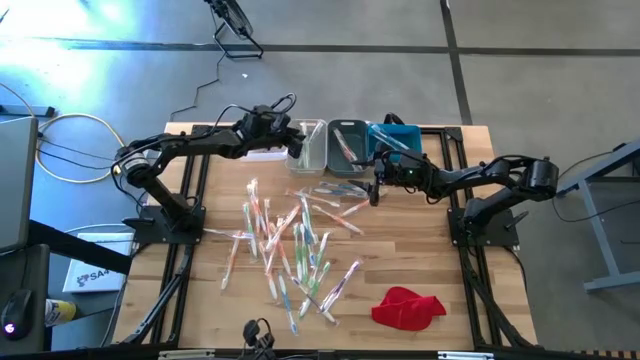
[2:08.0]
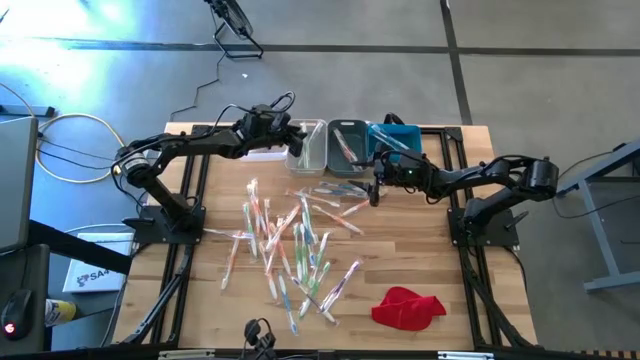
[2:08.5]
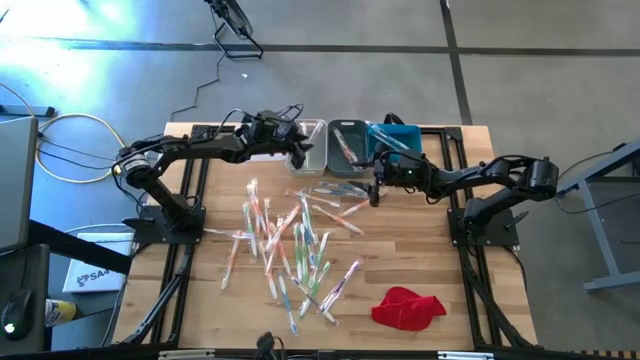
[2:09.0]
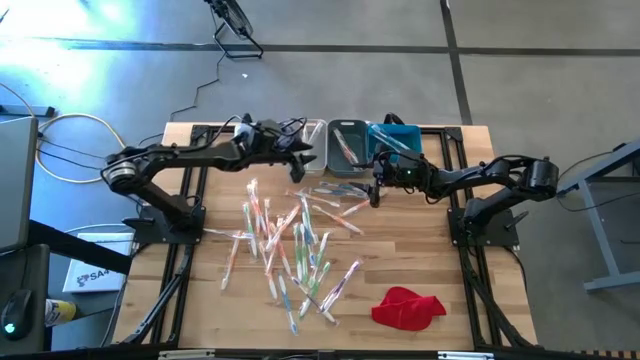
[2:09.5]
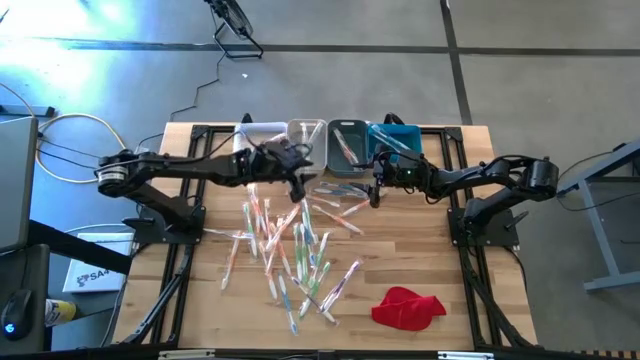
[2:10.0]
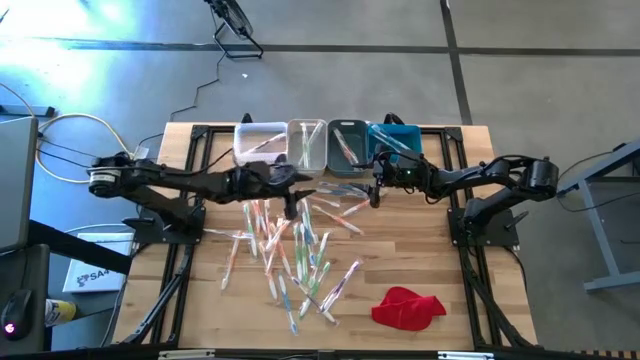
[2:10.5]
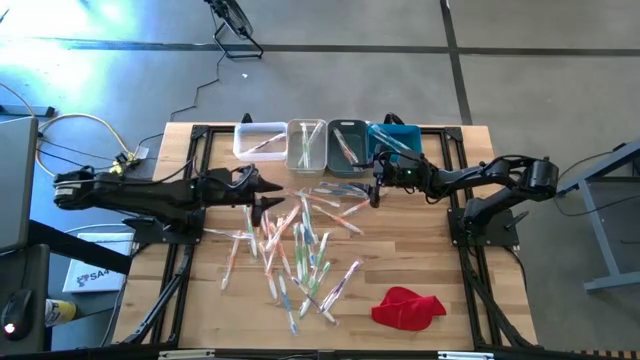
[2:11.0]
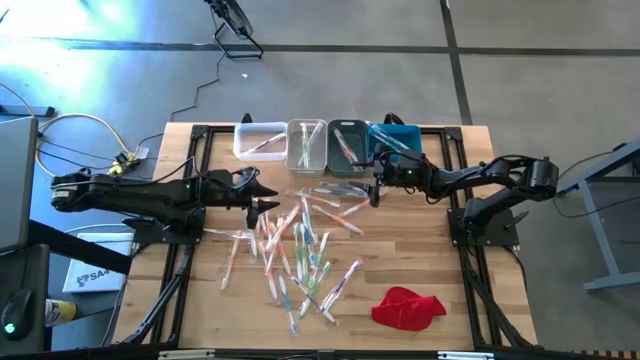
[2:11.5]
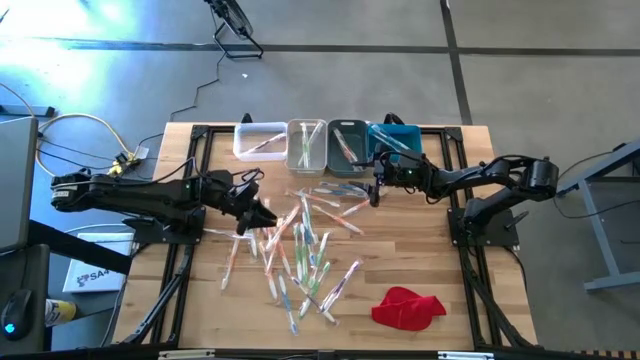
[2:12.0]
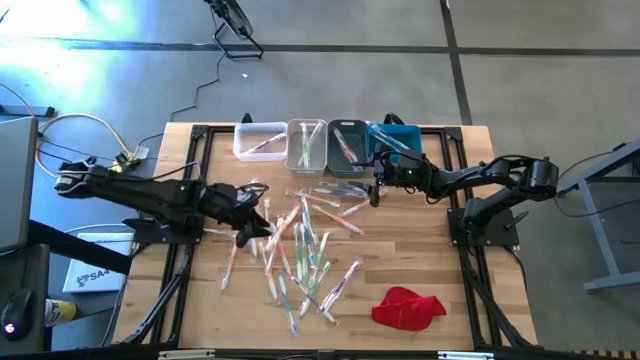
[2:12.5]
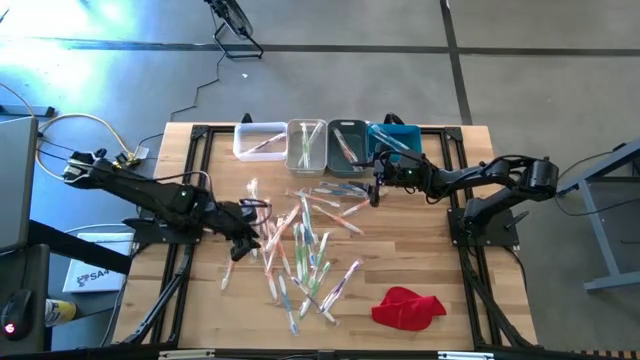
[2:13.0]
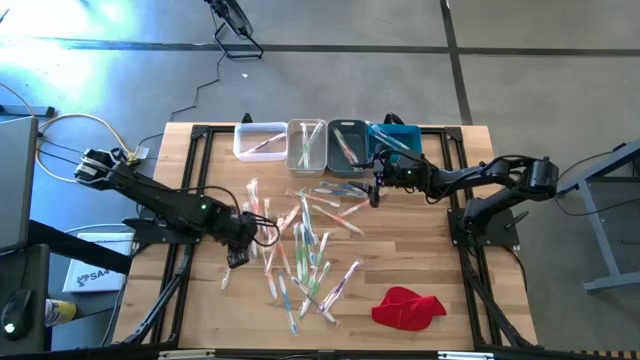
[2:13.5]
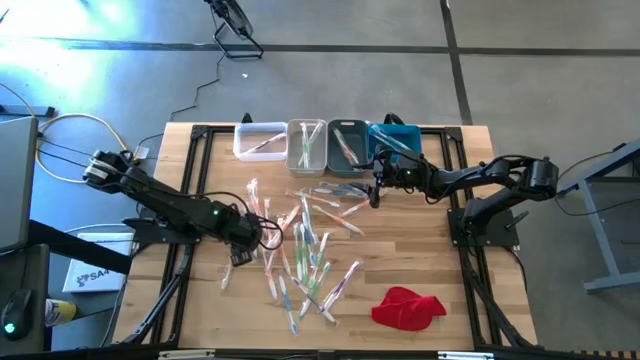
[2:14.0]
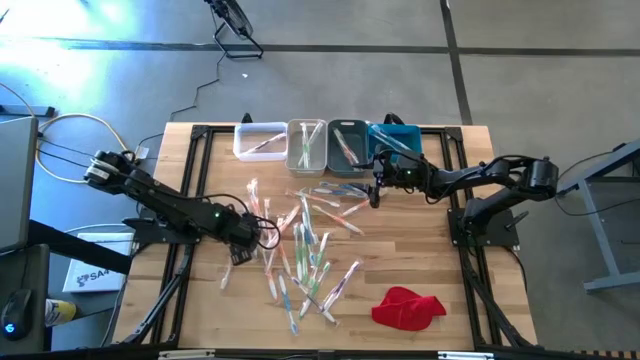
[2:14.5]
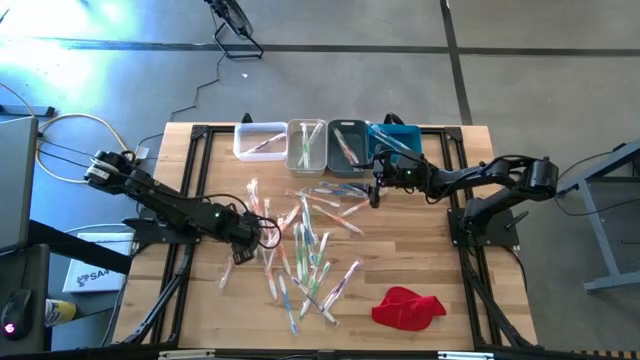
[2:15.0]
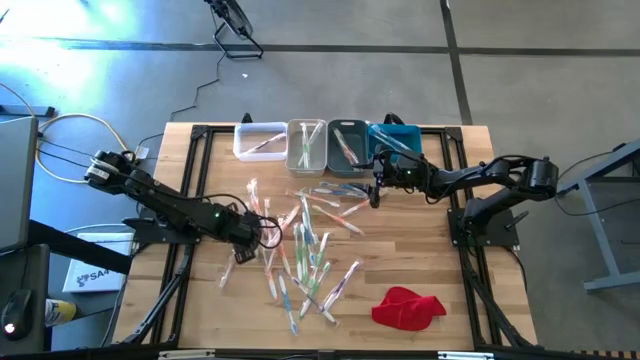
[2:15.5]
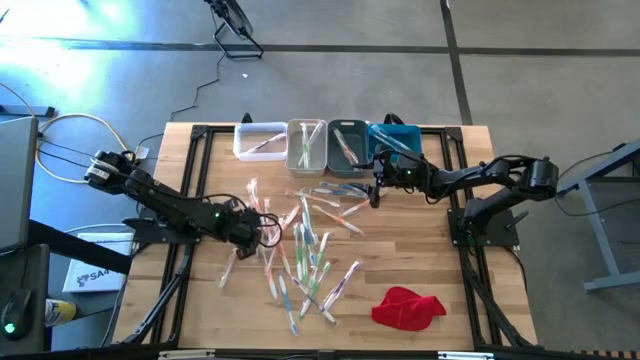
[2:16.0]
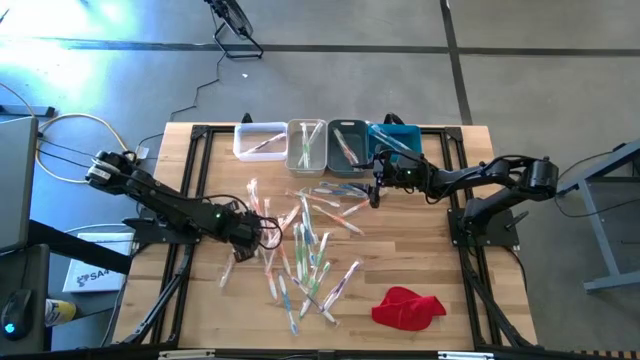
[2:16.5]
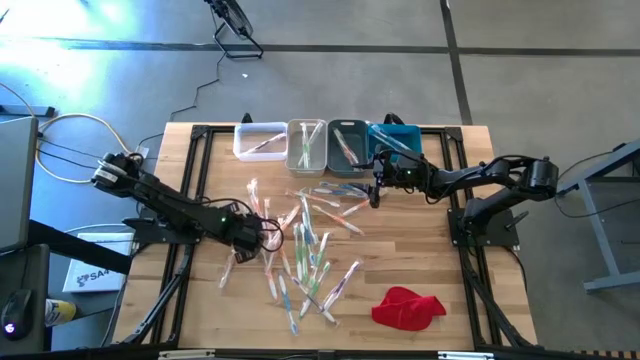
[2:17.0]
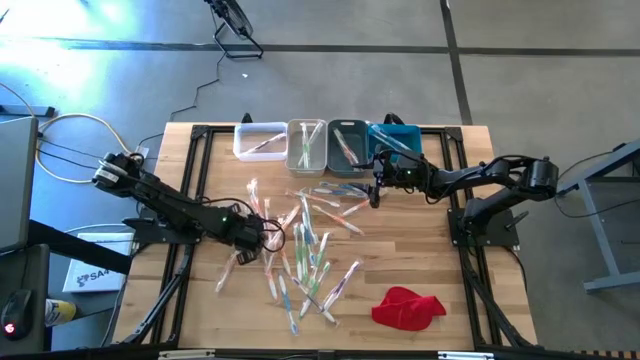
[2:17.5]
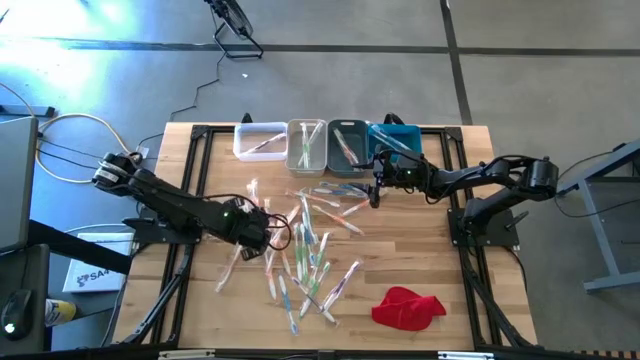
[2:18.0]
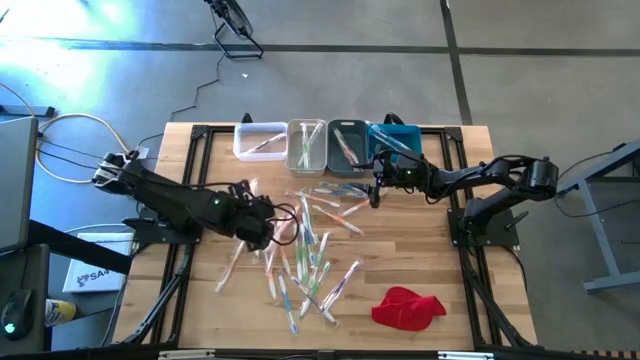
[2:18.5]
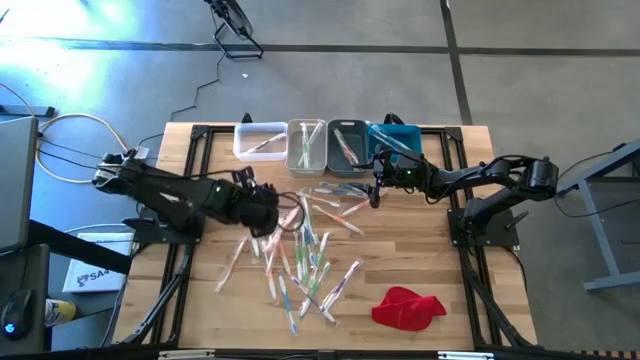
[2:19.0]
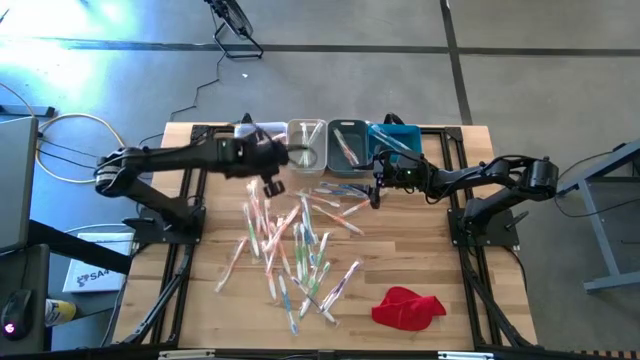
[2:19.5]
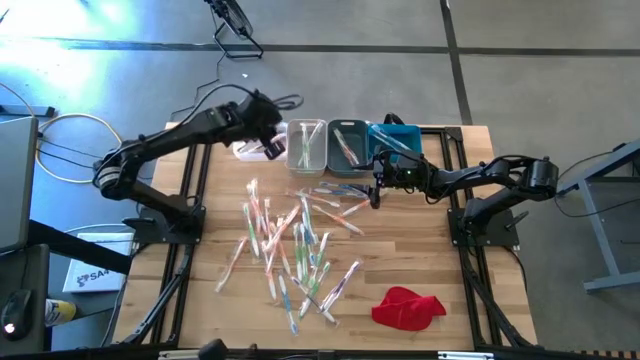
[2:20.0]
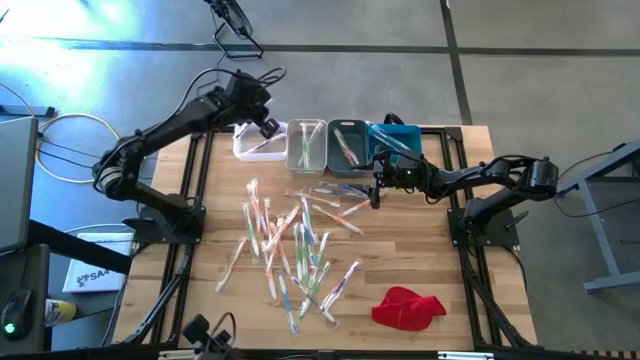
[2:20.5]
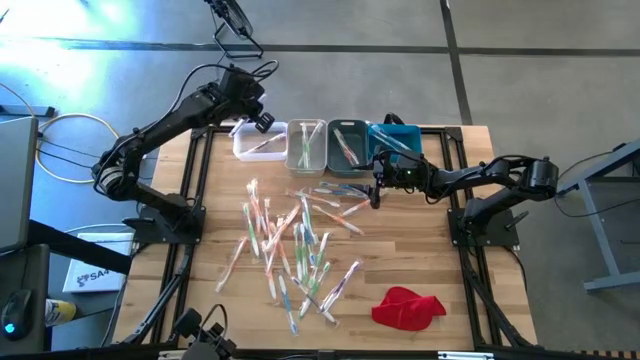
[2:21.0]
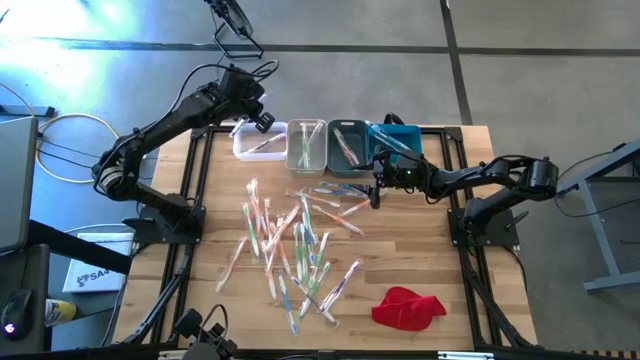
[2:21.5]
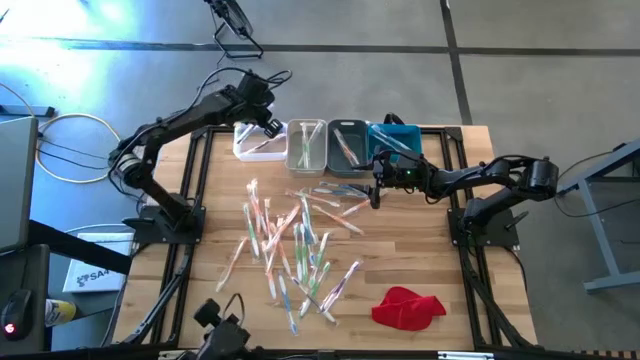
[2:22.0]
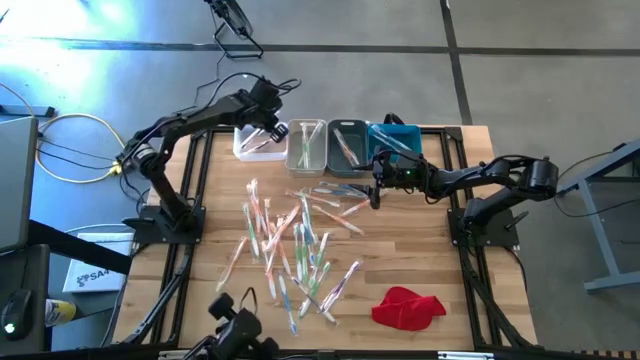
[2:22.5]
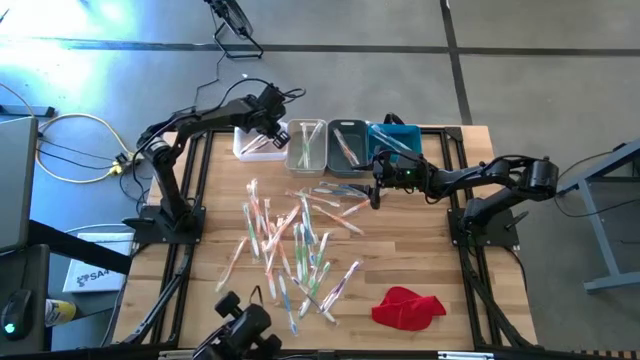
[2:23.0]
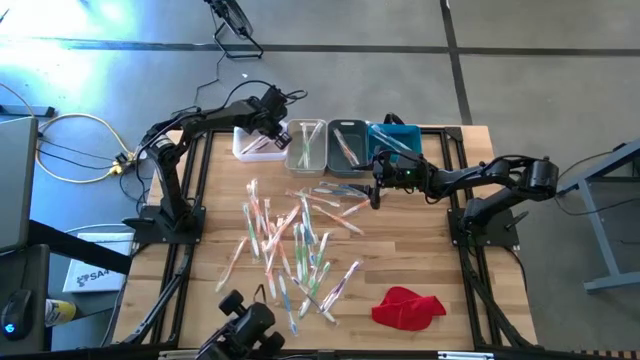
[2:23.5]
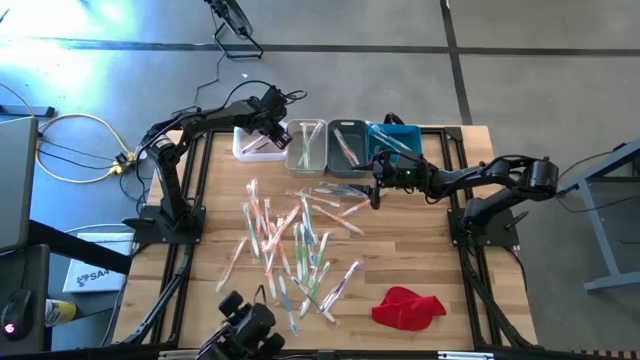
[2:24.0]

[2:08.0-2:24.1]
Task: Pick & Place Toothbrushes
Put the purple toothbrush into the transparent bin

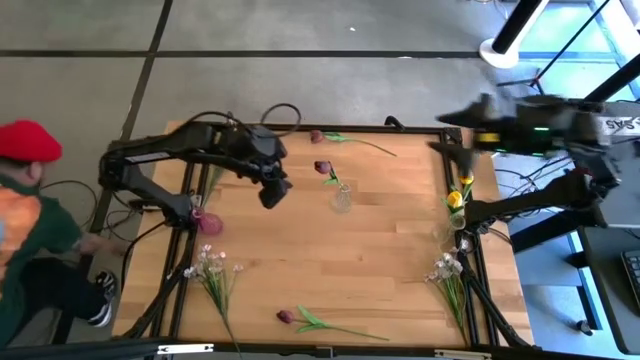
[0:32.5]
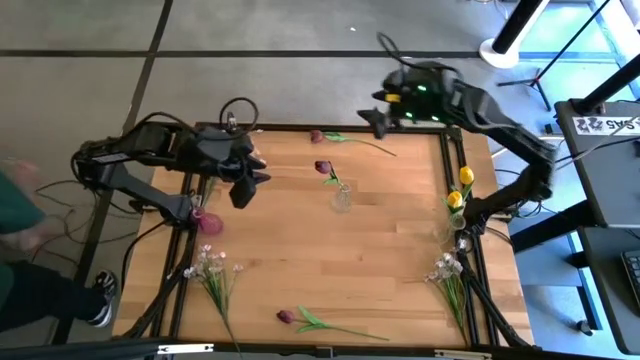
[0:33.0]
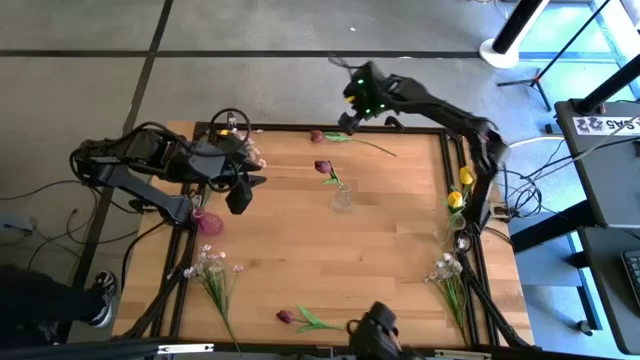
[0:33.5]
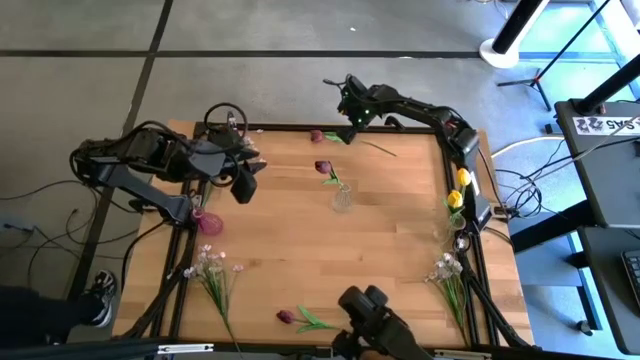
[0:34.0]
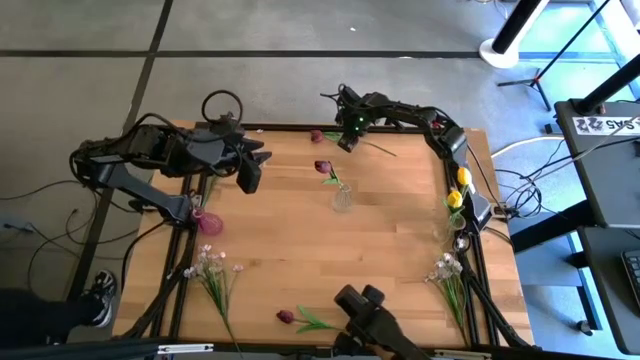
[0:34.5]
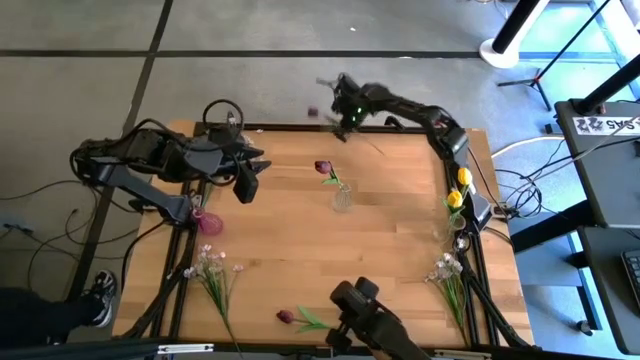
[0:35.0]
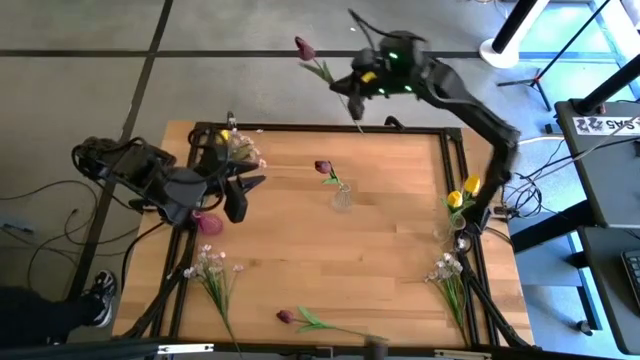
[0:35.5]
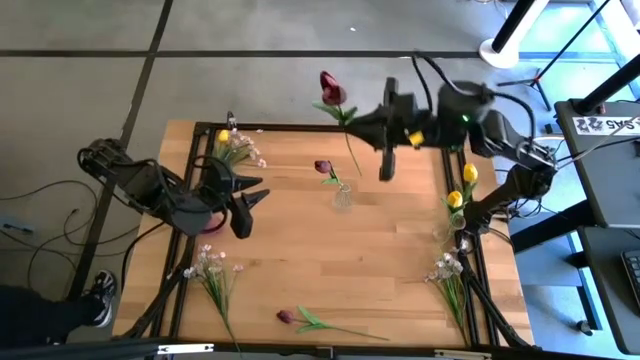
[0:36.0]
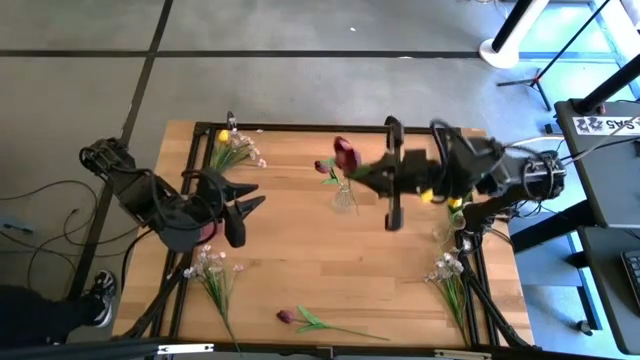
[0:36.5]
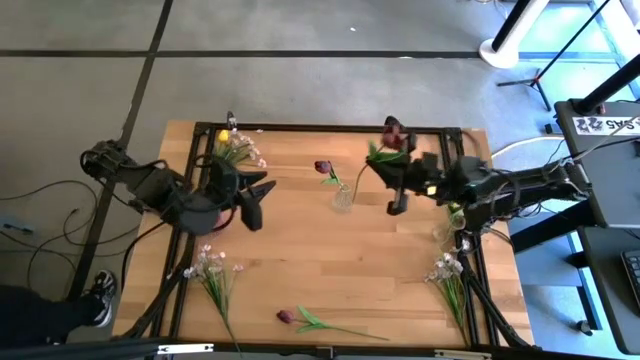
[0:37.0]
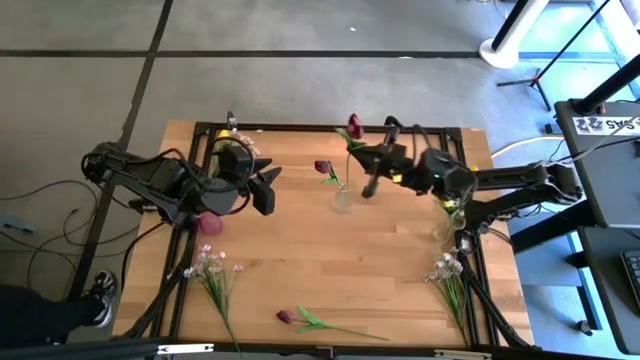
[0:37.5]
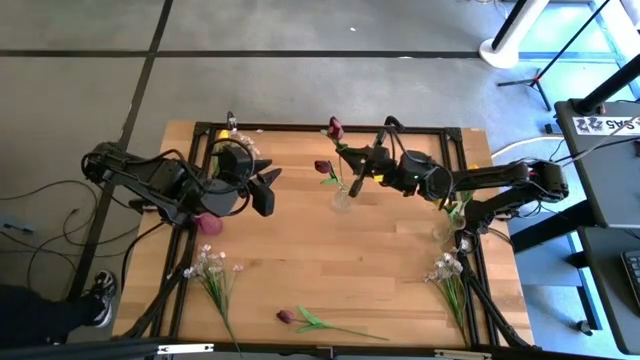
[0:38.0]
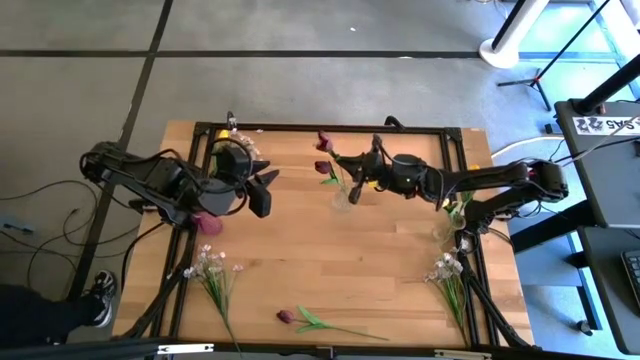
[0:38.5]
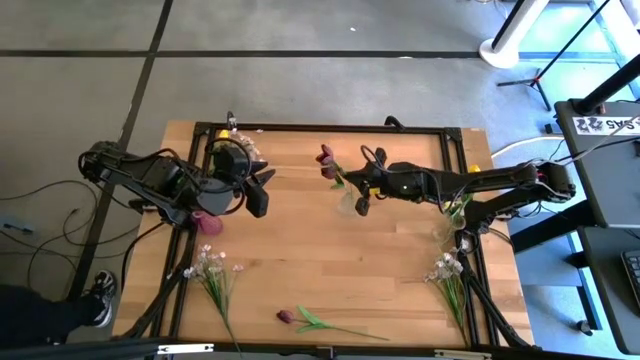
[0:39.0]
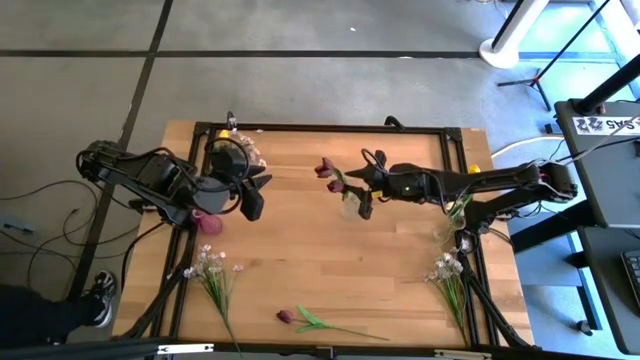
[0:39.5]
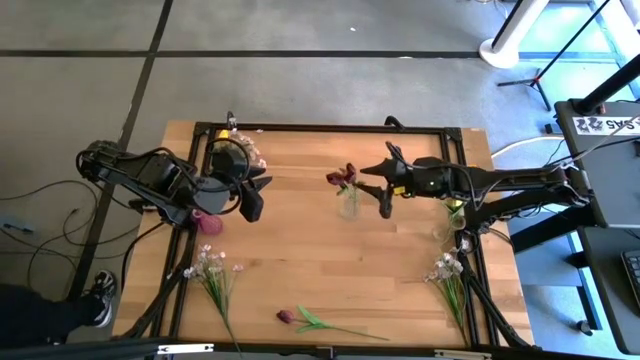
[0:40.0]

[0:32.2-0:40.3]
Task: Sort flowers into vase by color
Put the top red tulip into the top transparent vase
